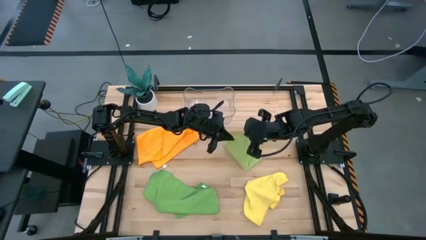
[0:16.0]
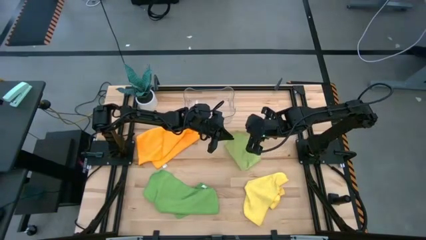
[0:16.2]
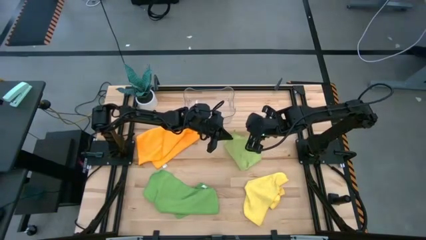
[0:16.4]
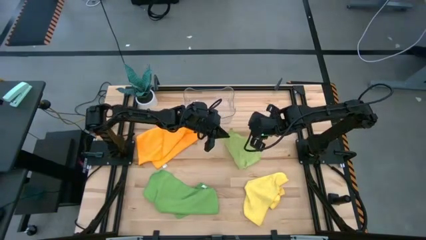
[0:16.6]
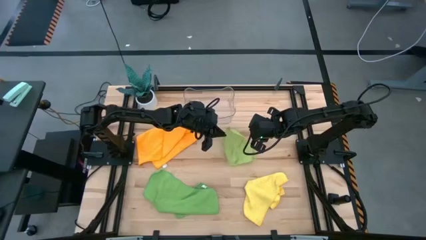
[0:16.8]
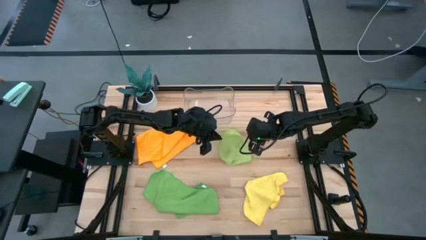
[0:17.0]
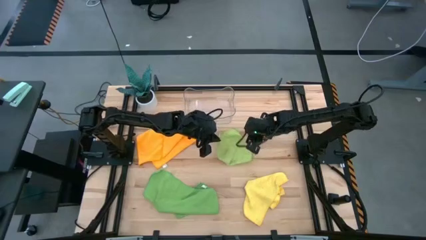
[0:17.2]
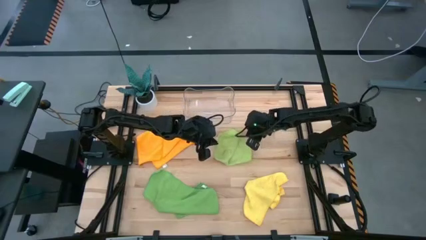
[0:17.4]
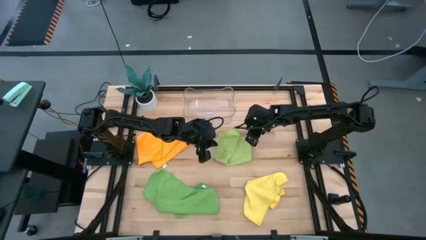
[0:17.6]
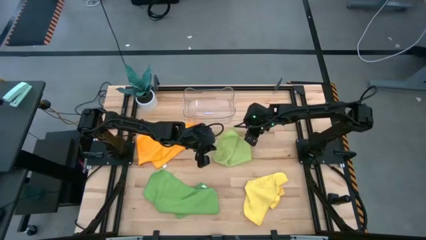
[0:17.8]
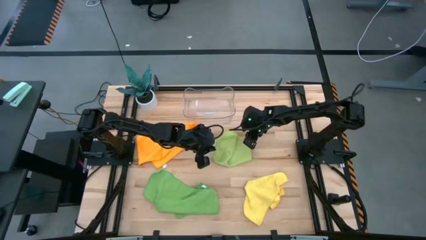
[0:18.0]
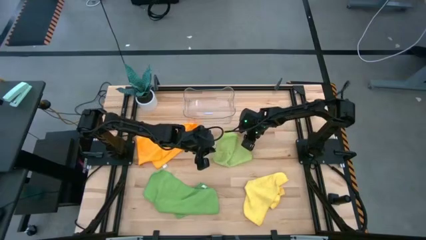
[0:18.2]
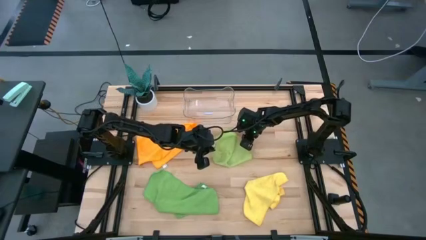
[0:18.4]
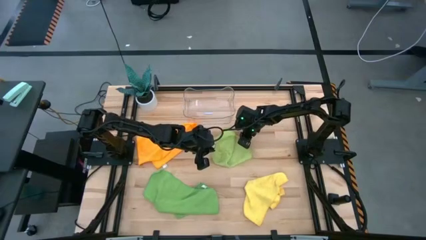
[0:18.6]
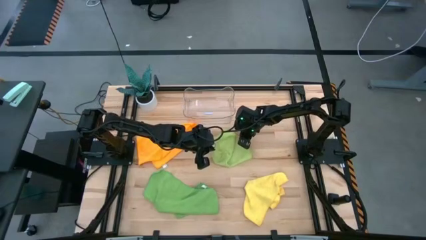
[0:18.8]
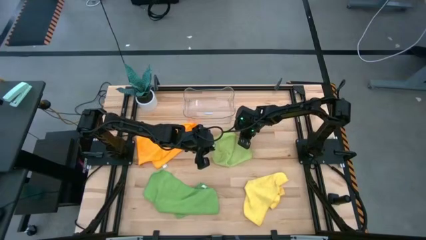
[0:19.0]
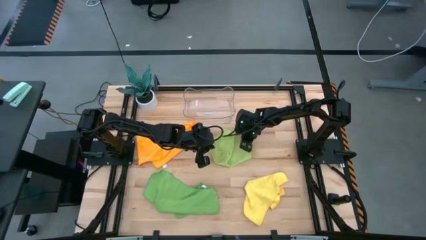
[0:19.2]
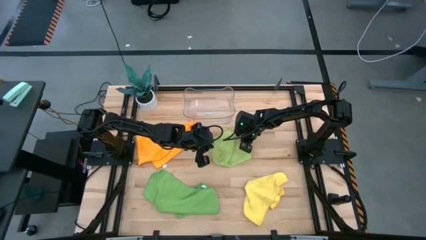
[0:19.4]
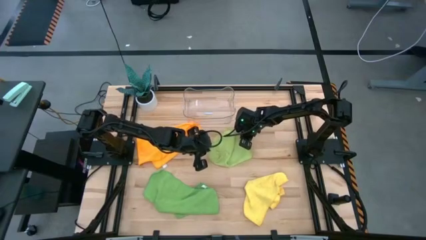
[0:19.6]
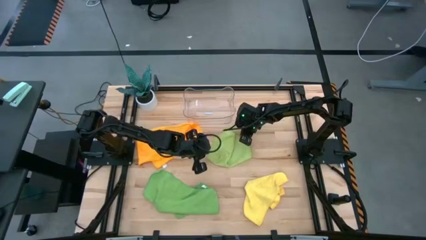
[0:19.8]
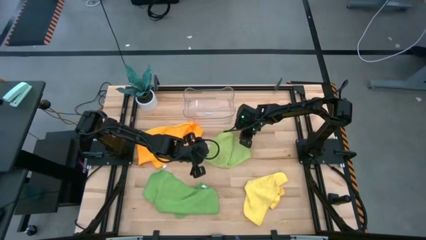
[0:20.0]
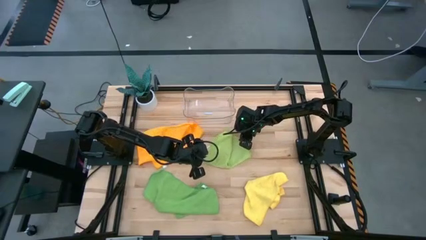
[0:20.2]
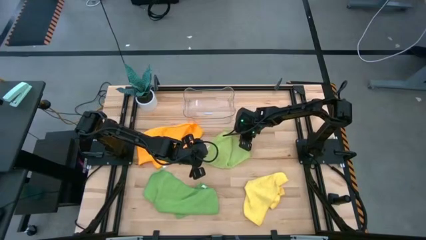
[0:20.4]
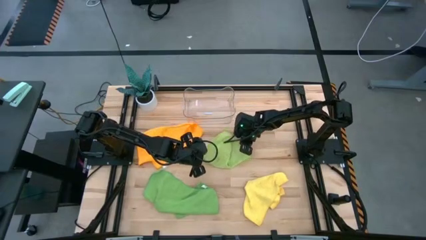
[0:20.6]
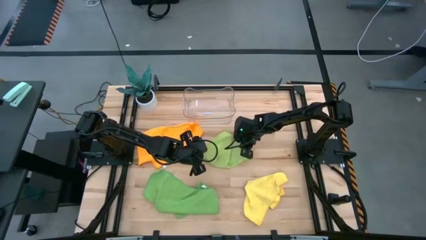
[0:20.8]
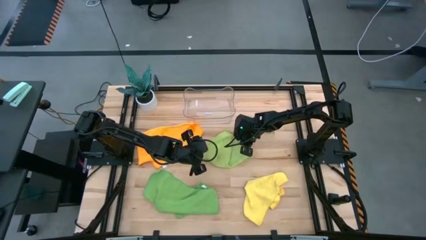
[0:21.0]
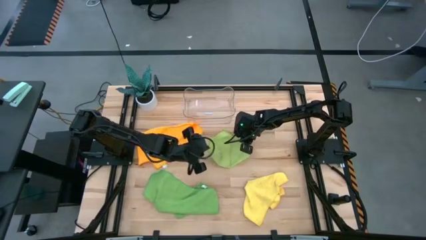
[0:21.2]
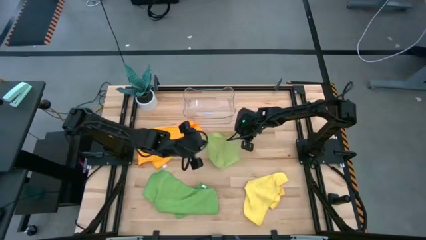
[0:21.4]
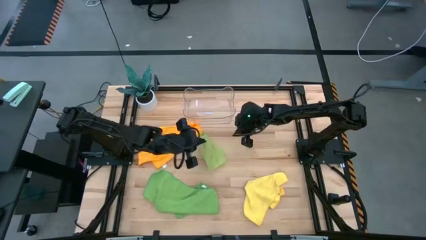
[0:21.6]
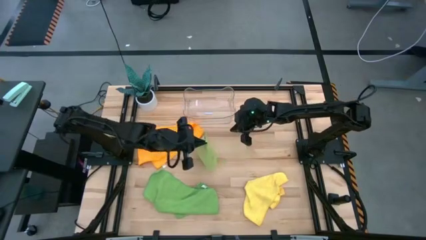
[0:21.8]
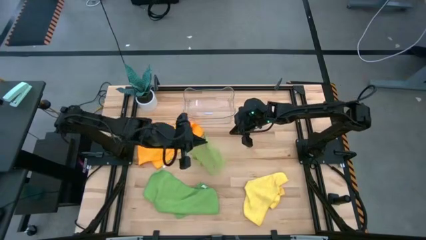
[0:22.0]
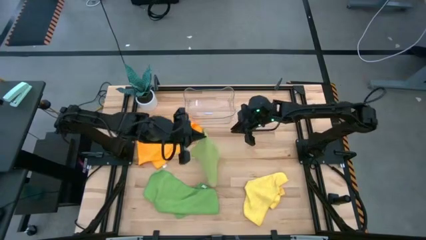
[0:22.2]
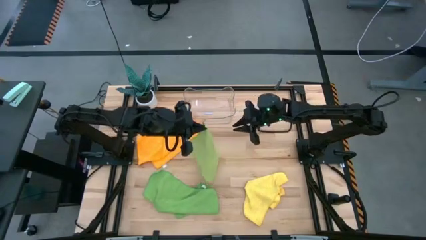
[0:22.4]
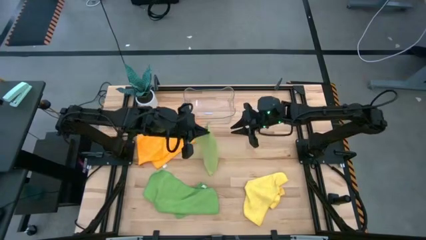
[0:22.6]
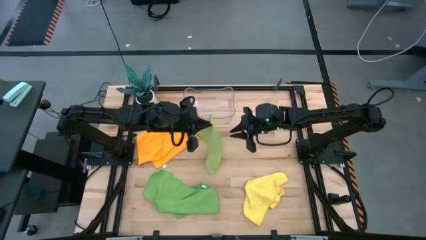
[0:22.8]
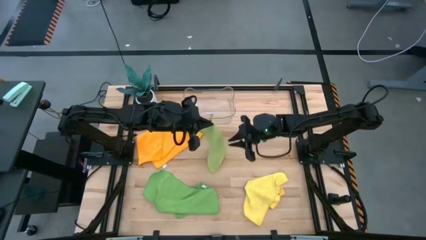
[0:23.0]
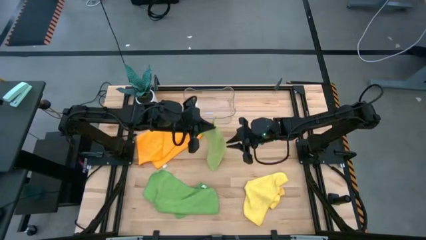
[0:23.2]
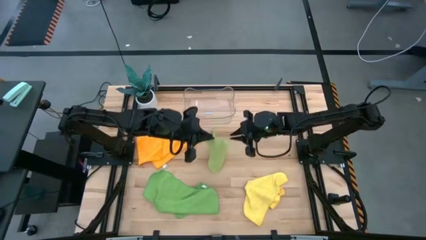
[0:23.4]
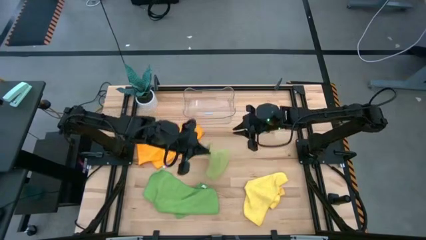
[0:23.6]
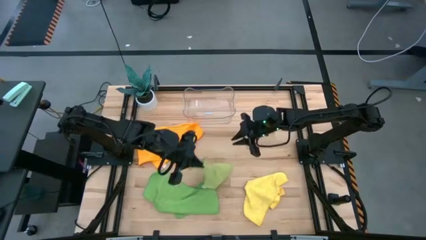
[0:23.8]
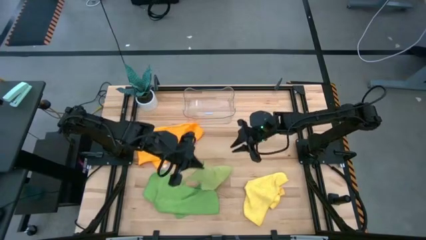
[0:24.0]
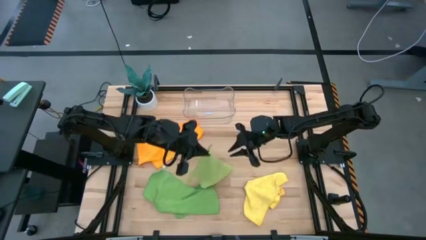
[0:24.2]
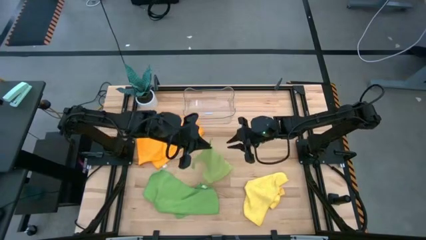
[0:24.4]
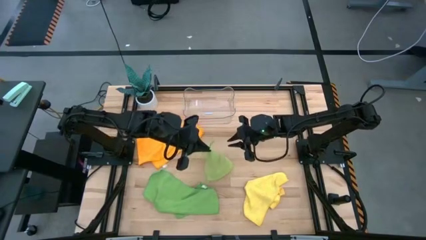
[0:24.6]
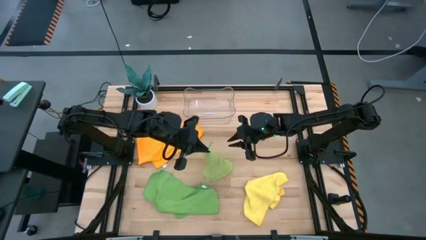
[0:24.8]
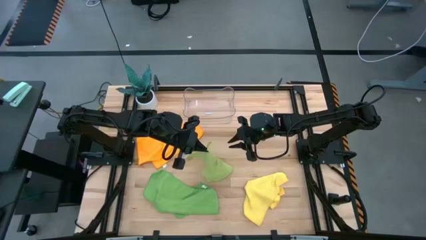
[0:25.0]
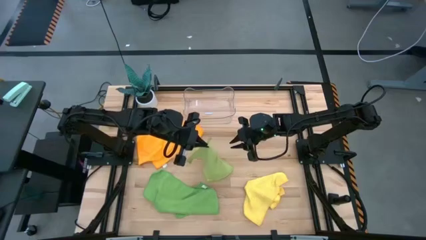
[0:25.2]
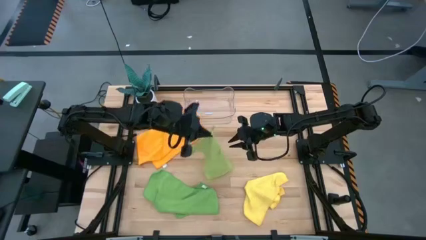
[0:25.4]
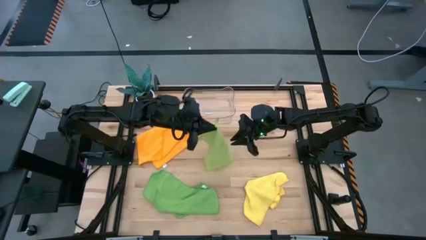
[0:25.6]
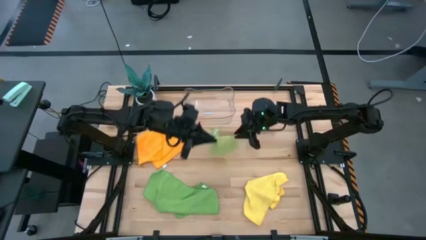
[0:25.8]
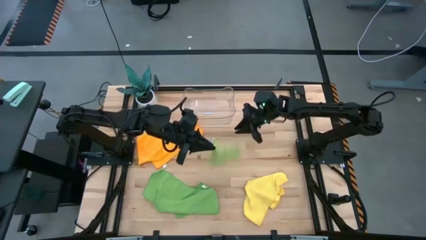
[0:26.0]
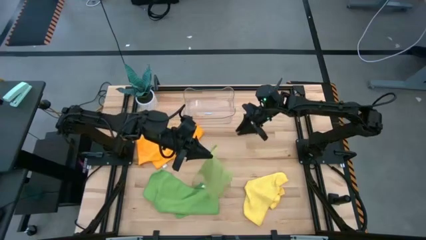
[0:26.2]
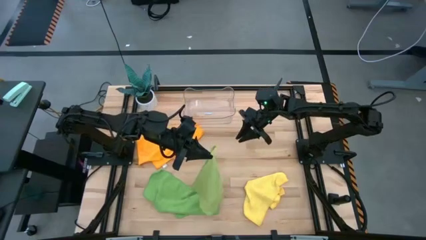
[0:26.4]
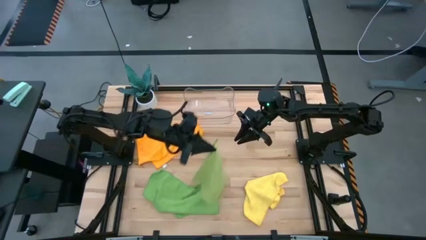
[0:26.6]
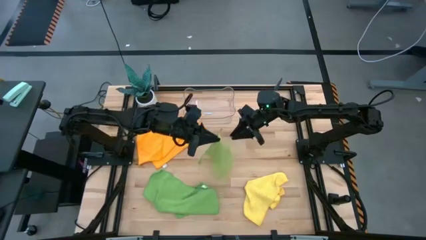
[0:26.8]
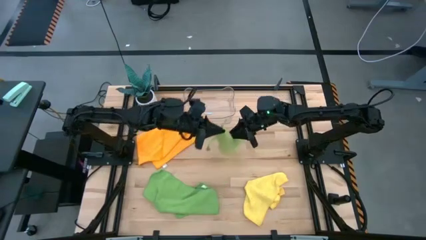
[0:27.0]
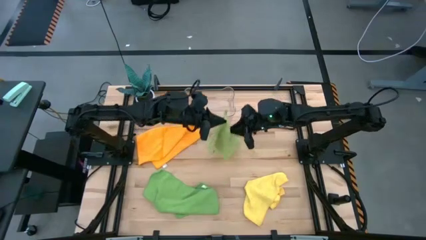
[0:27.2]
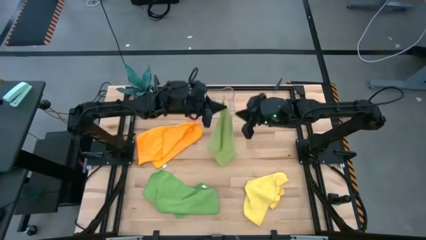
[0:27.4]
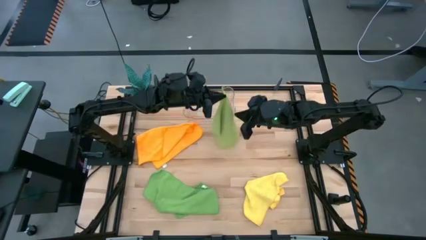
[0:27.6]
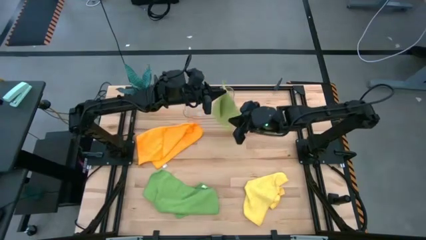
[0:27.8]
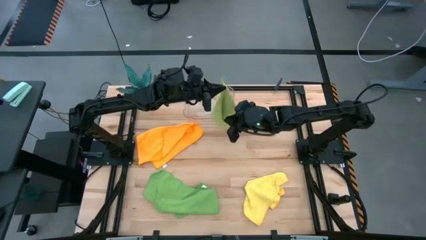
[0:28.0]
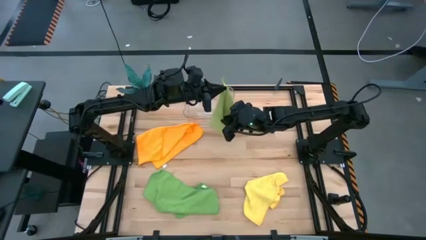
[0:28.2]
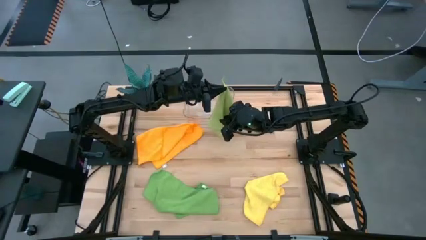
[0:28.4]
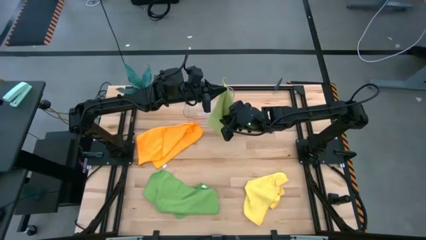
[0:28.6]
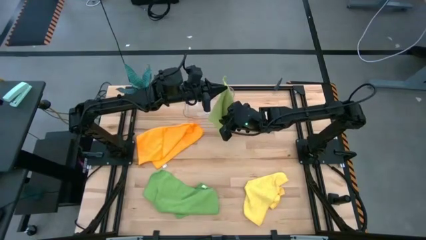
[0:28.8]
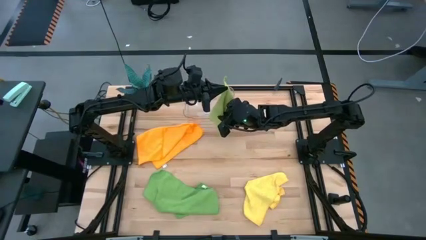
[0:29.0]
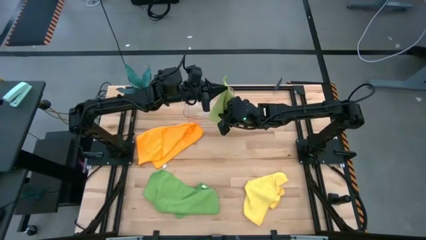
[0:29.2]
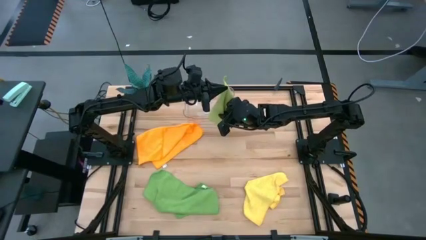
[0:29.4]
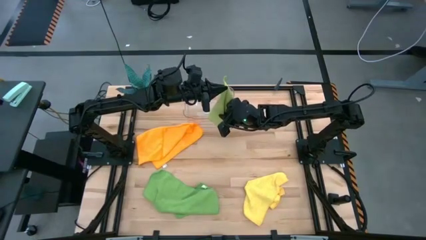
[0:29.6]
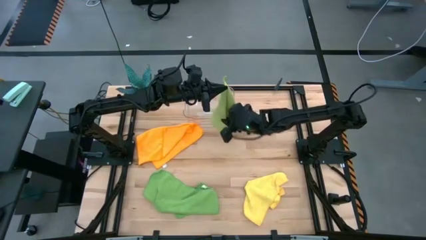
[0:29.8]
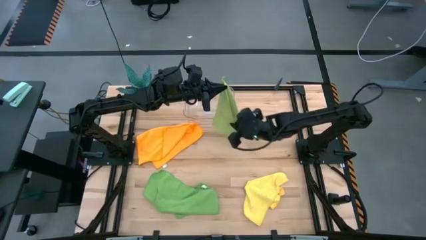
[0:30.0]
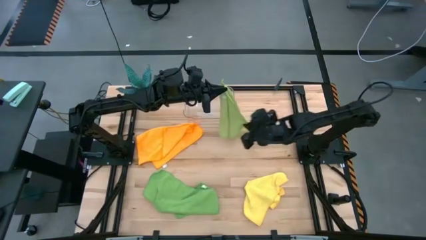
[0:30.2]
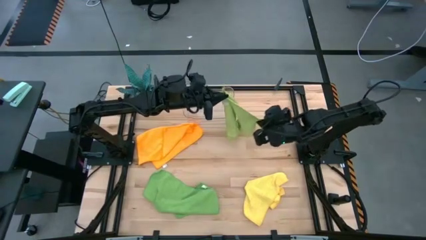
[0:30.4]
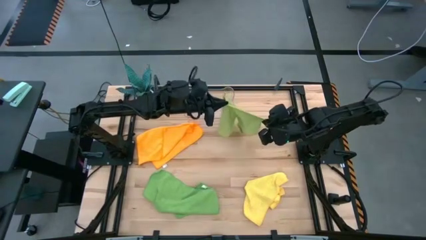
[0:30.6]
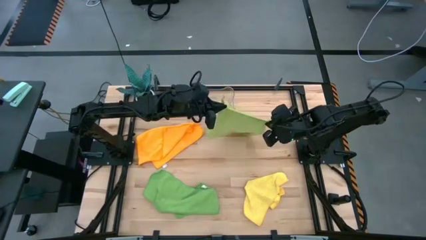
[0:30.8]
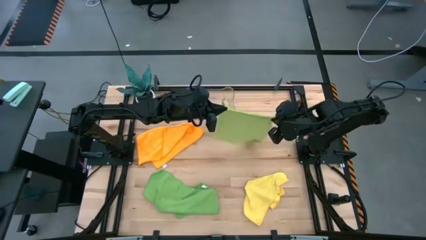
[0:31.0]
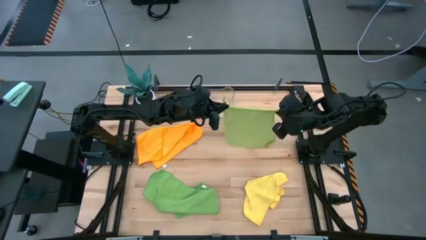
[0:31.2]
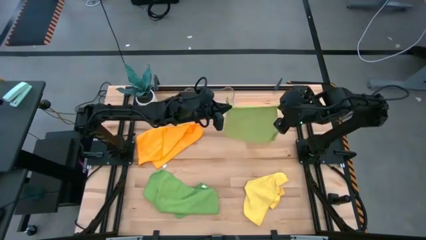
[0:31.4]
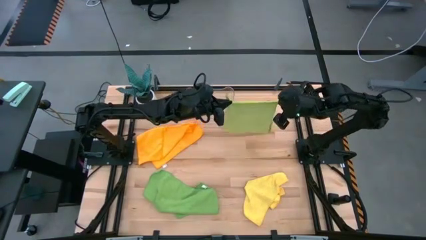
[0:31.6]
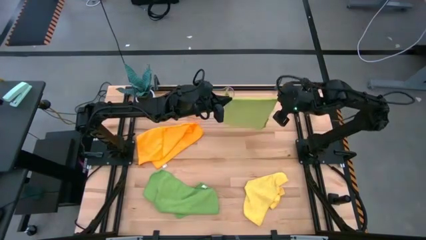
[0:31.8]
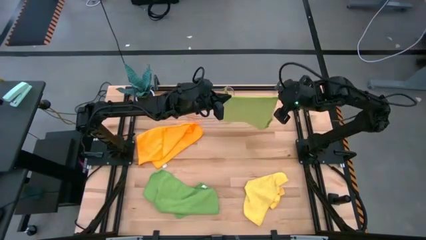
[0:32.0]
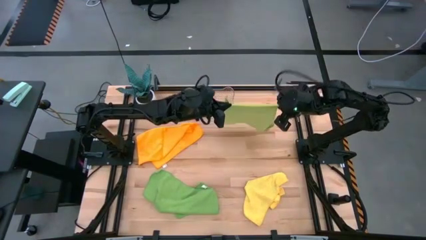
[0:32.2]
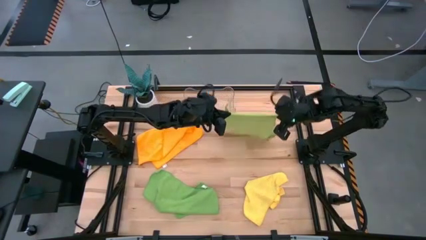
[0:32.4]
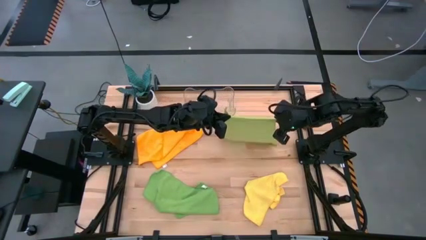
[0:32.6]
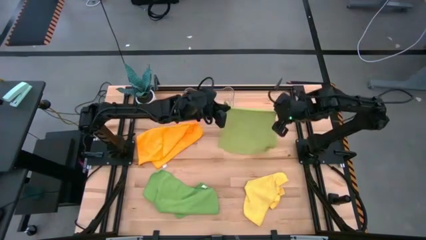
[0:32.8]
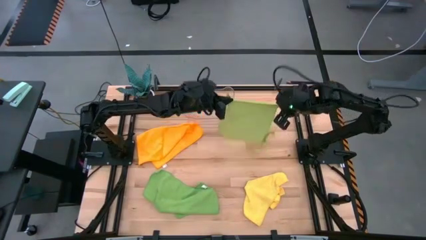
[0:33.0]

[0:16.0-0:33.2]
Task: Fold microfiber towels
Fold the light green microfiber cloth
